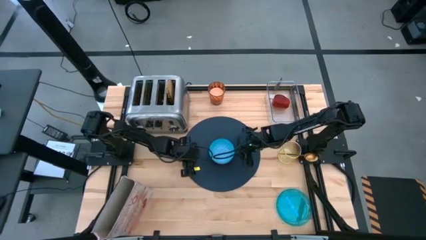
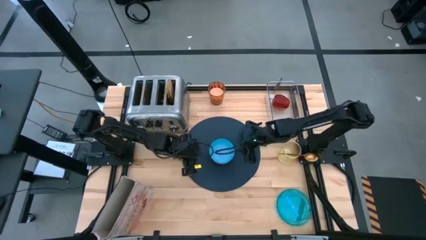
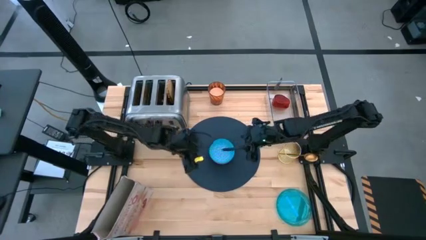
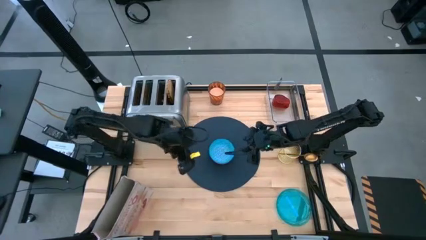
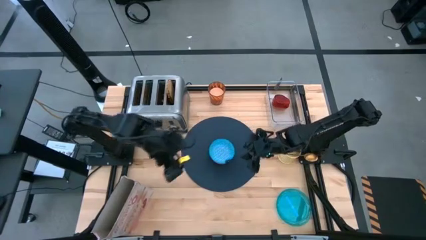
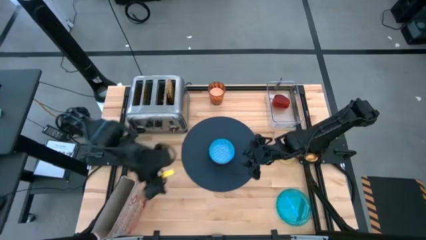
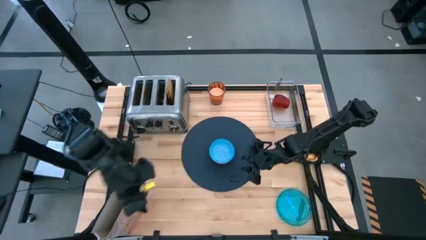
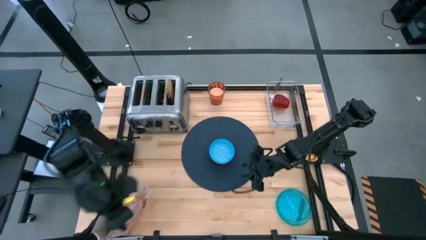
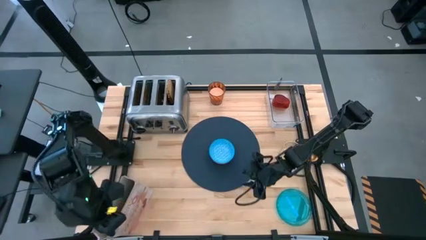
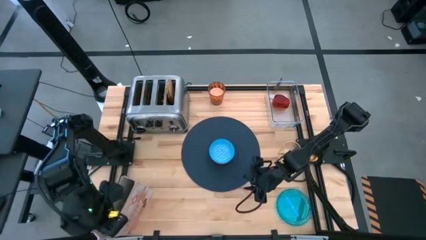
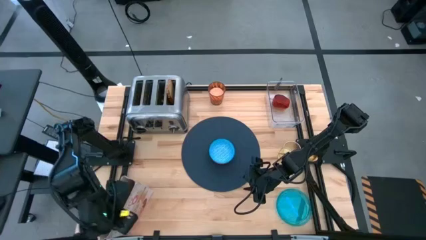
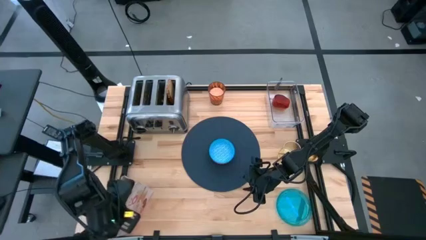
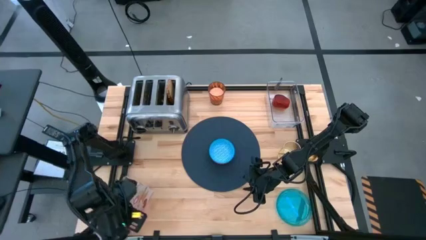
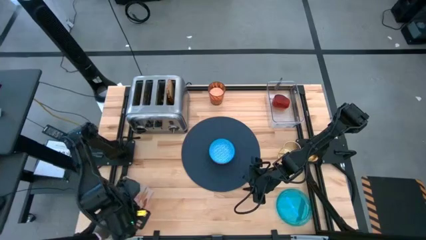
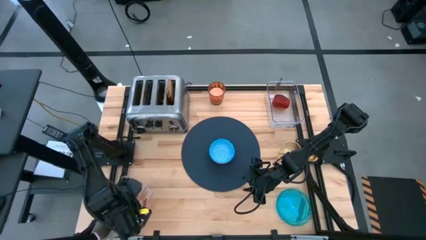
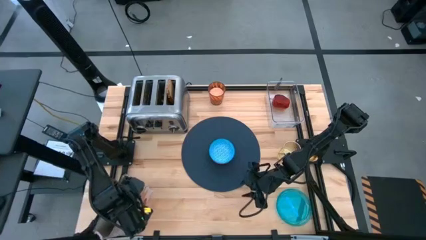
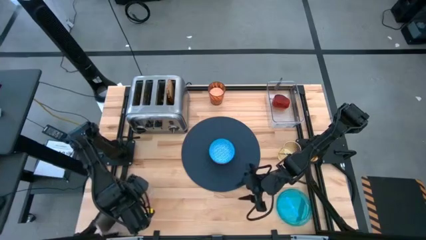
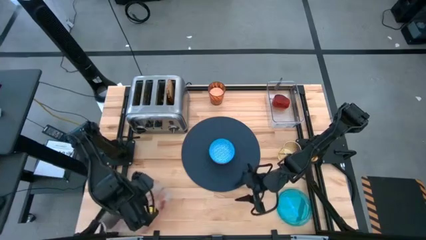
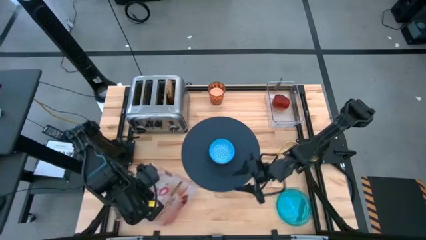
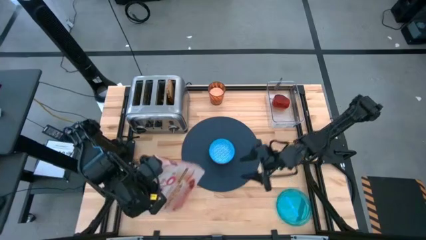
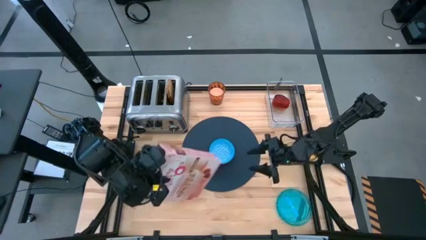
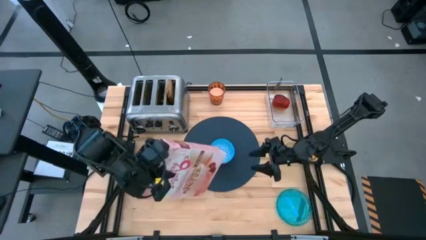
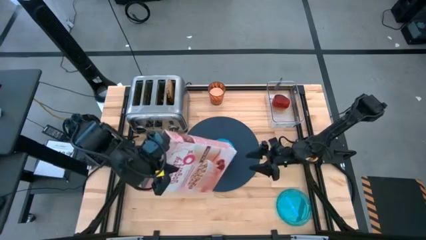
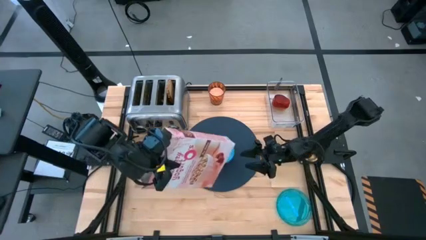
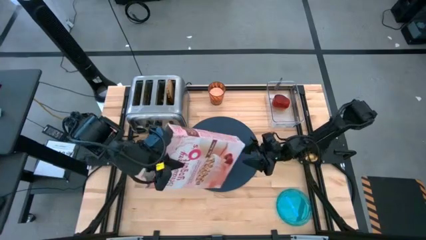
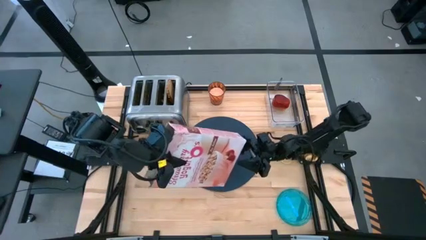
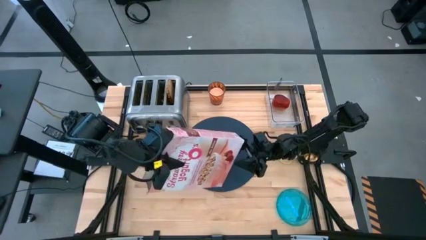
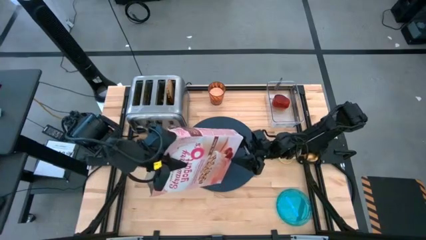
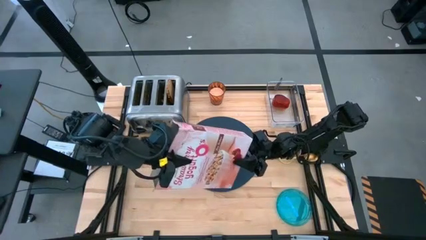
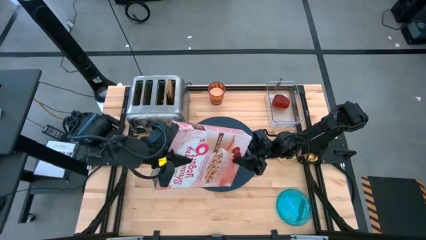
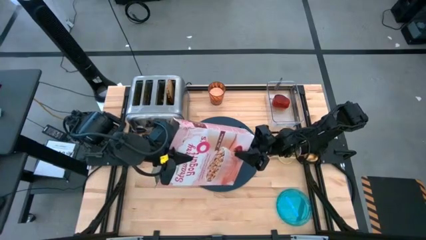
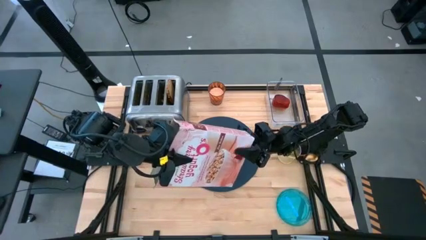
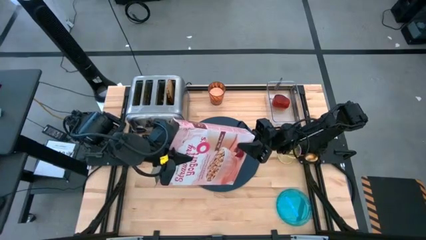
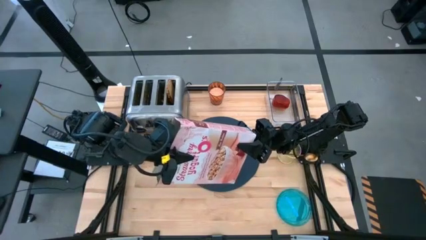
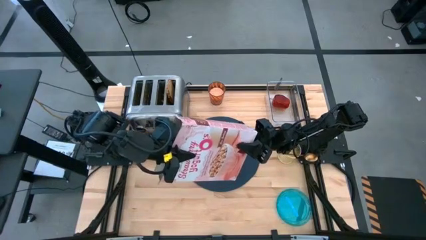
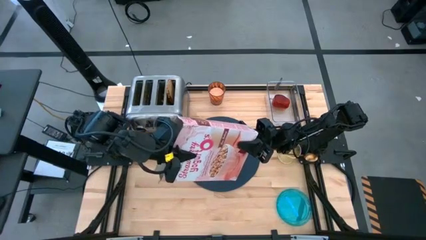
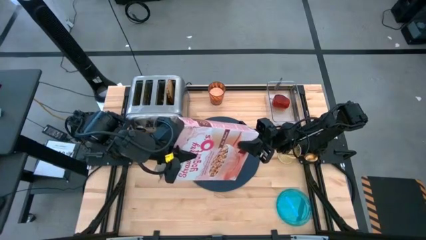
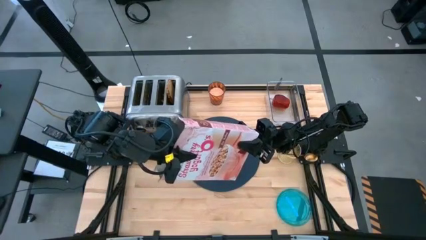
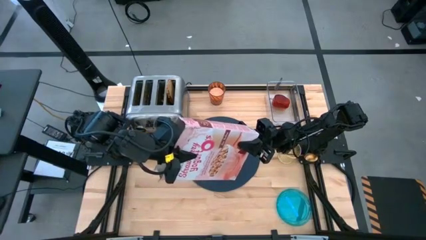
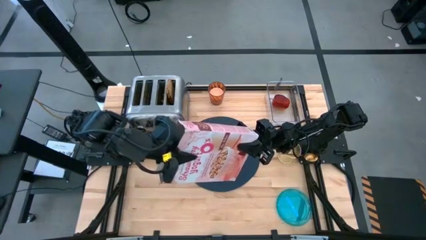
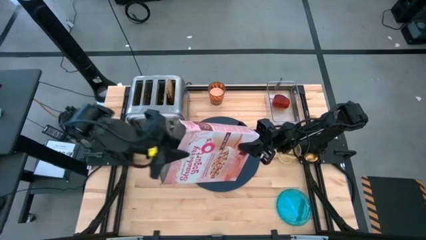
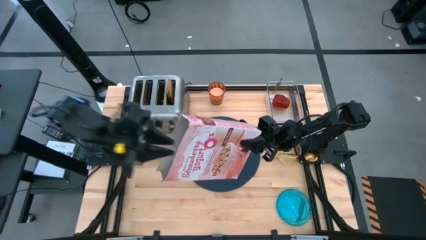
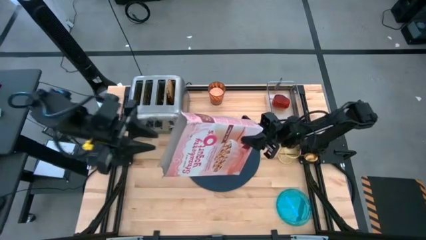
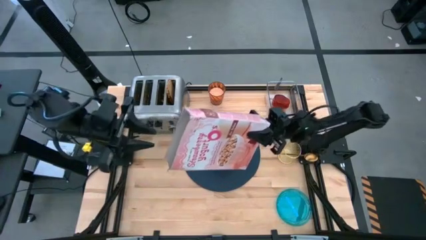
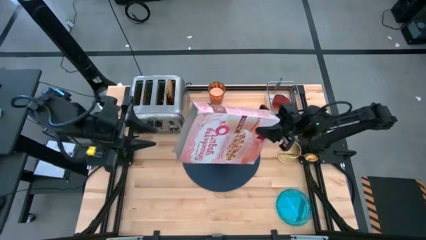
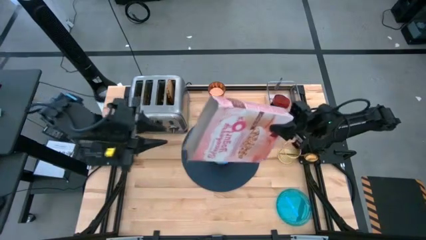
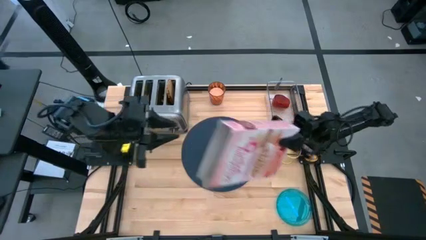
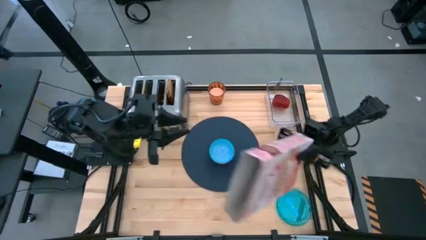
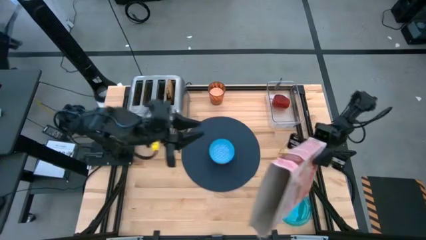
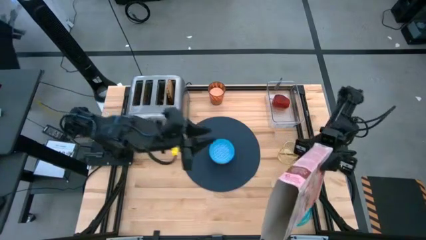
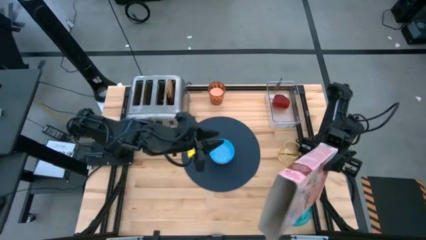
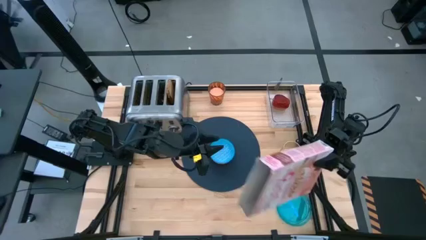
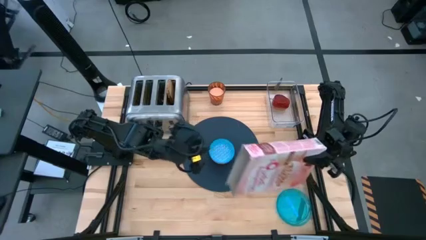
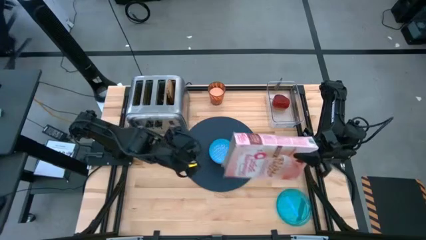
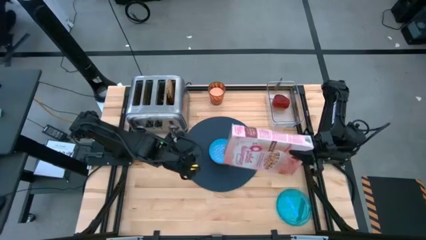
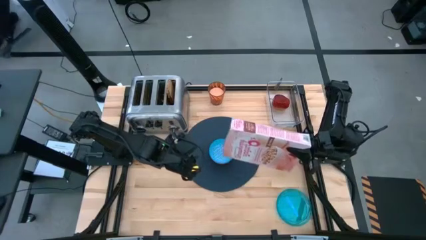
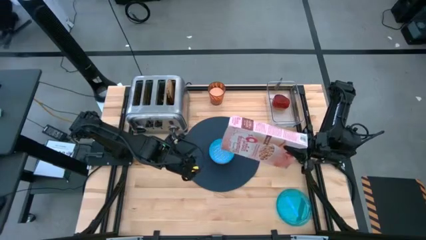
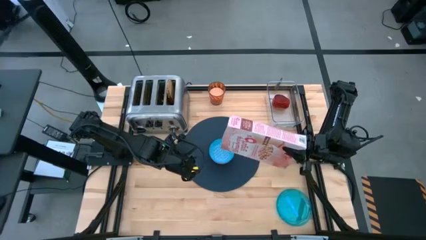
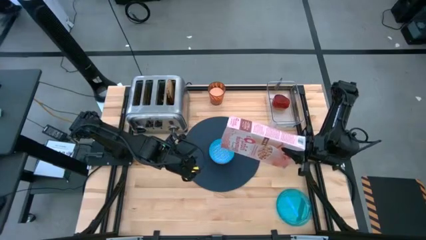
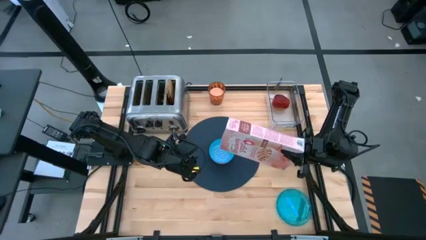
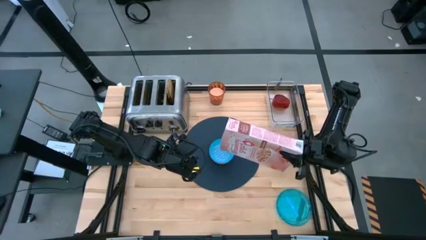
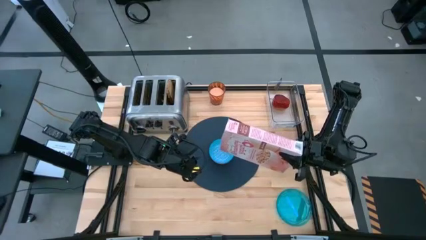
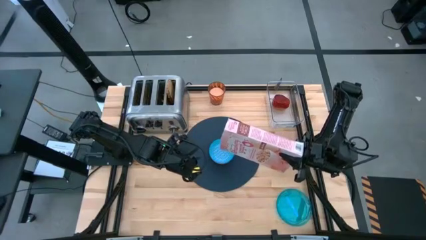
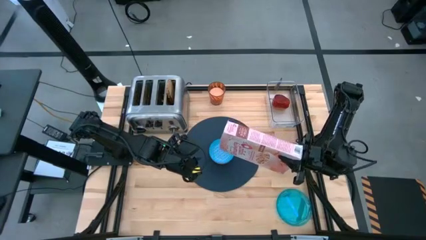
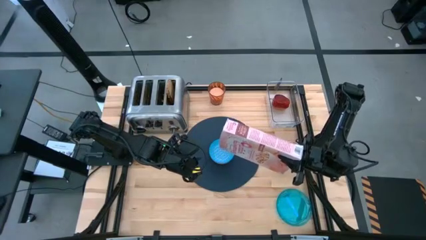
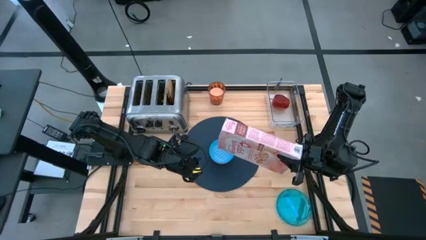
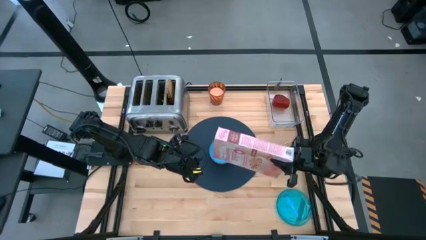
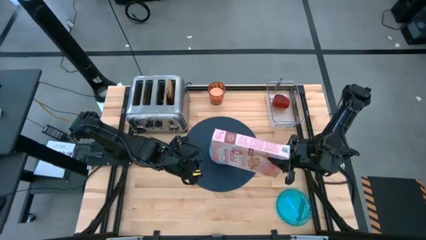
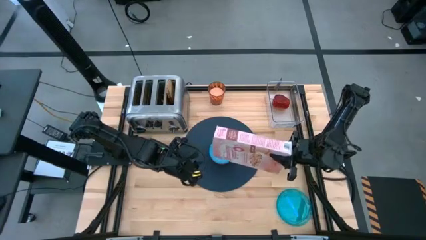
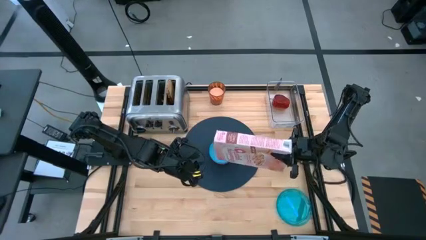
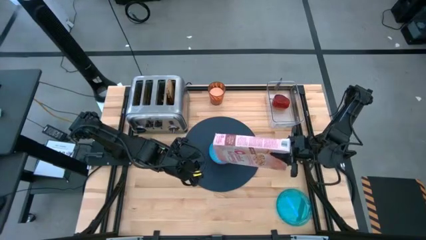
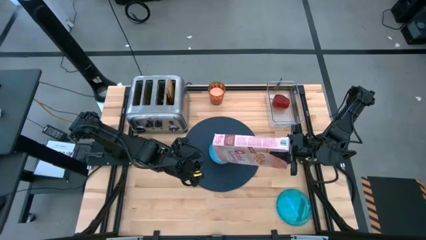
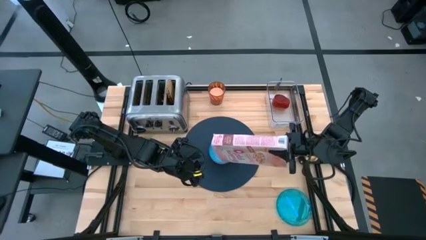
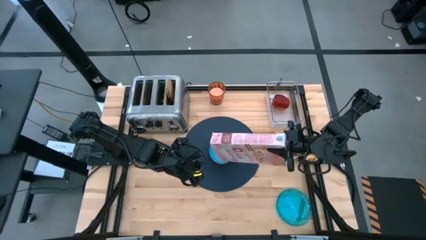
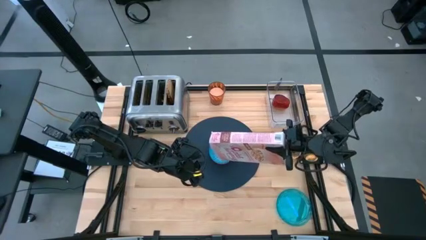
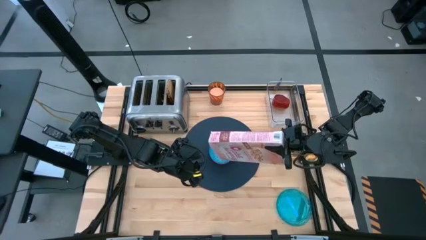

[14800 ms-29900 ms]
Task: Arrange a breakfast setting
Pour the cereal from the cereal box into the blue bowl
